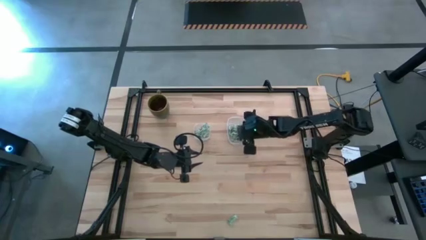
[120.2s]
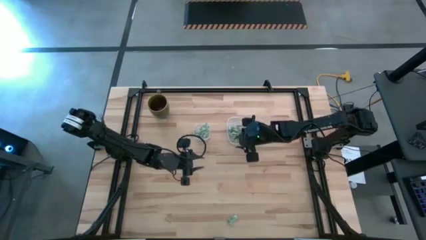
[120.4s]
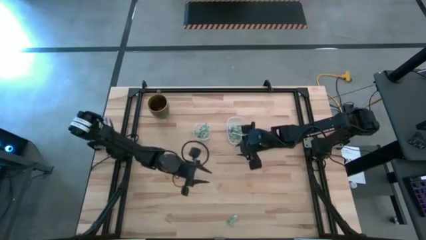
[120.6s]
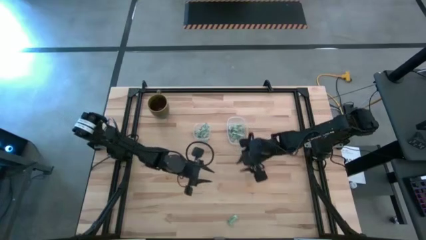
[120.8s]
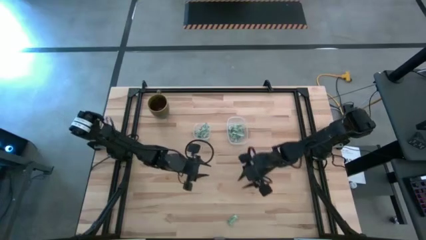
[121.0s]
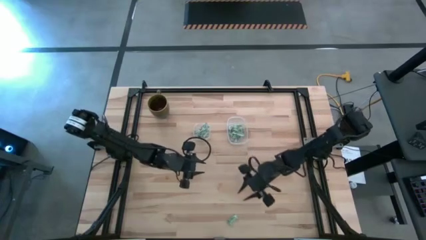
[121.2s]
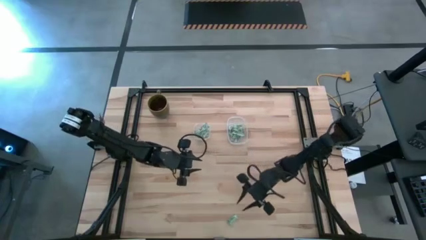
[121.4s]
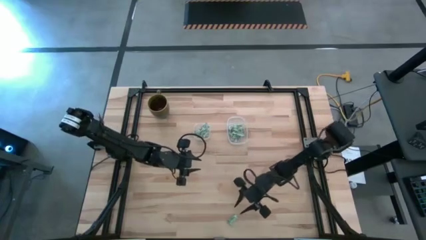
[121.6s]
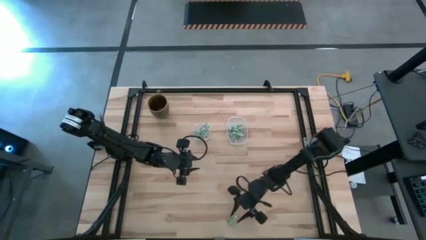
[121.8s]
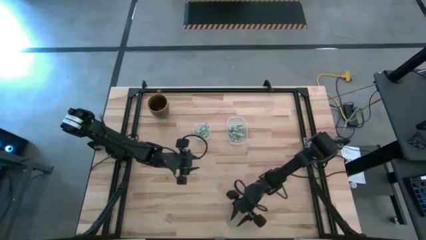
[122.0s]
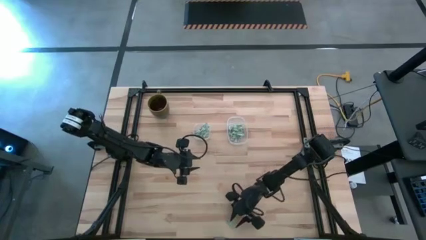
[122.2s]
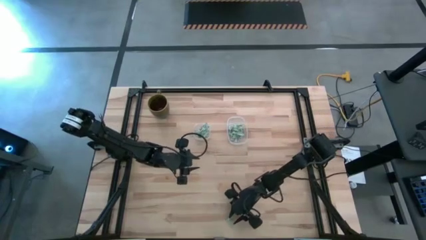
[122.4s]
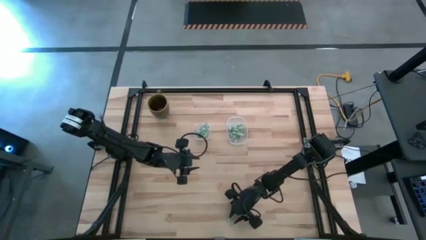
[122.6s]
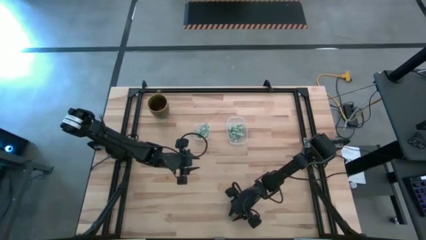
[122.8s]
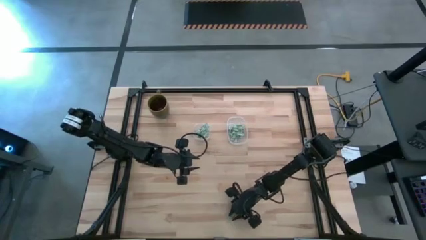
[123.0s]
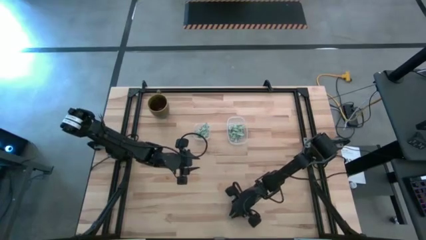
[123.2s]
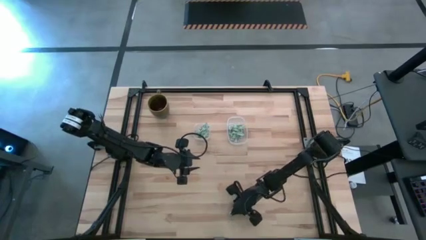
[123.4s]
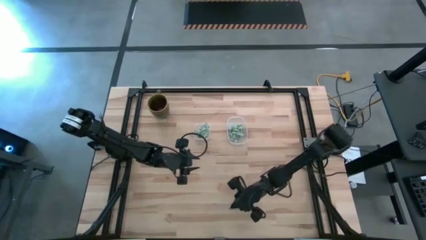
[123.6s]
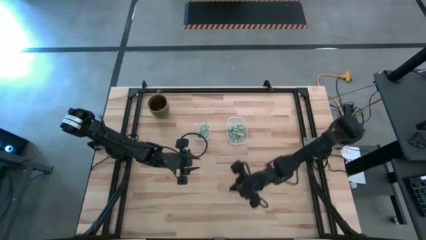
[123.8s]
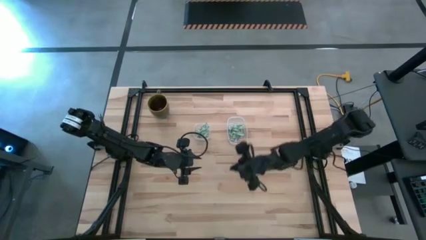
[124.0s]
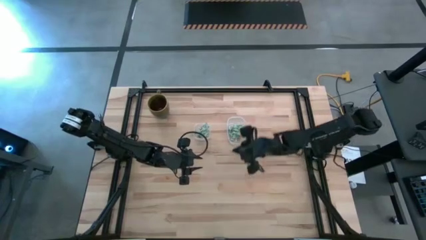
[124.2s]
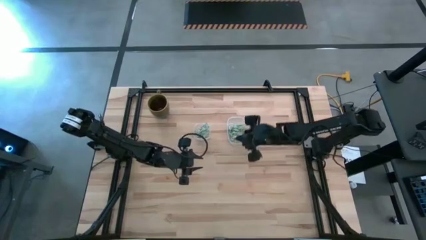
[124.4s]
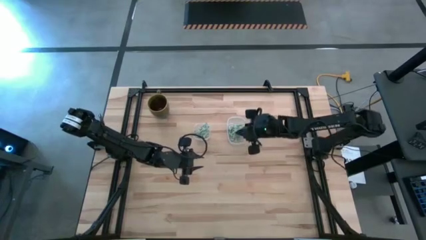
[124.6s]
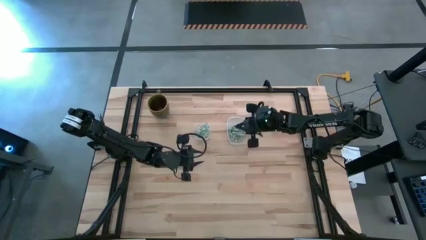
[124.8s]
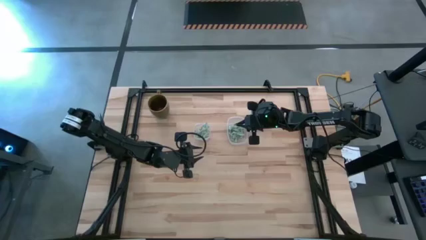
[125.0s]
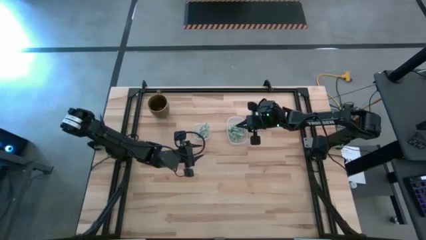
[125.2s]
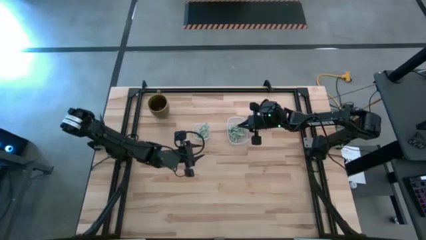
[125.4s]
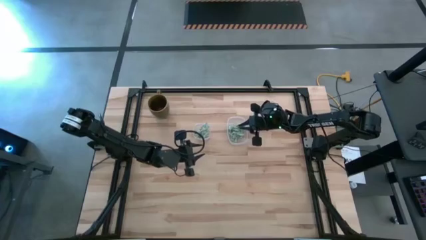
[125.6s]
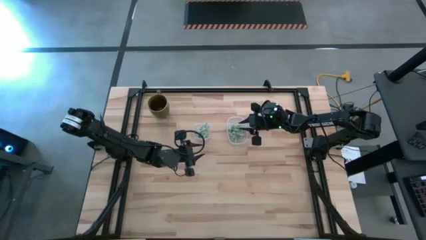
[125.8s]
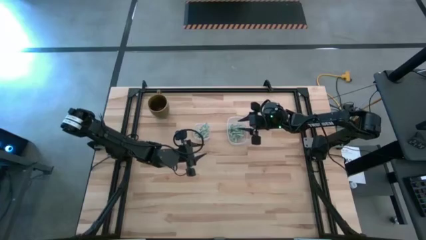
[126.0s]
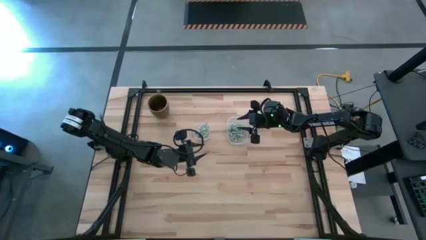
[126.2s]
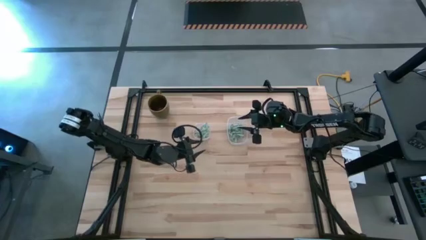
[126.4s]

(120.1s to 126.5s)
Task: Pick and place items into bin
Put the light green stevia packet into the right transparent bin

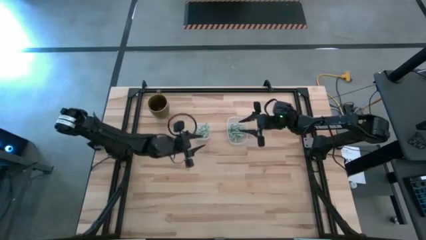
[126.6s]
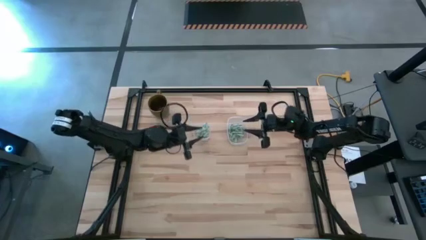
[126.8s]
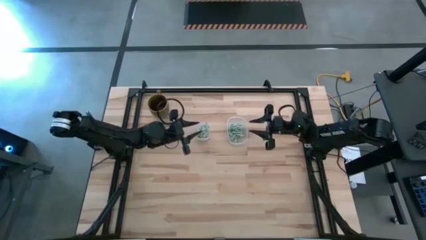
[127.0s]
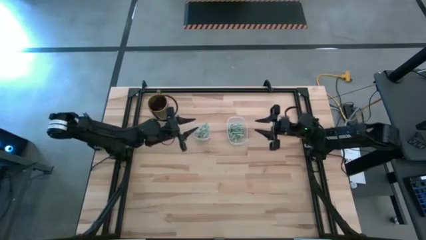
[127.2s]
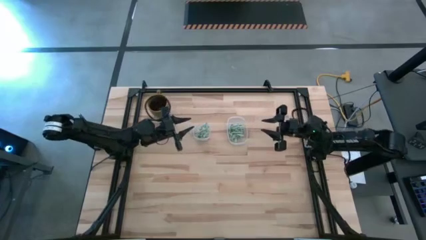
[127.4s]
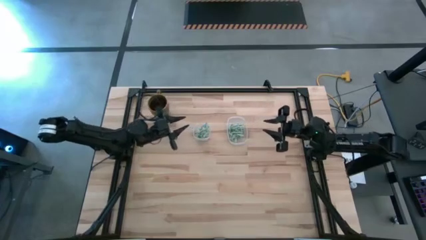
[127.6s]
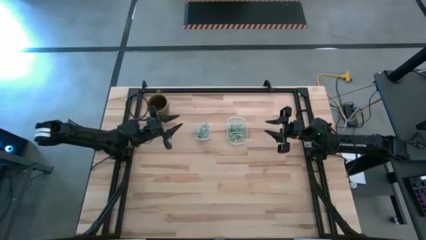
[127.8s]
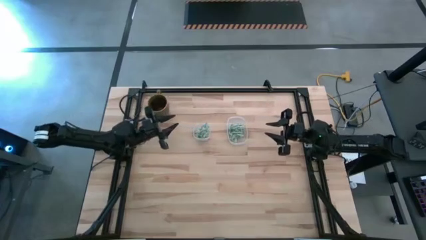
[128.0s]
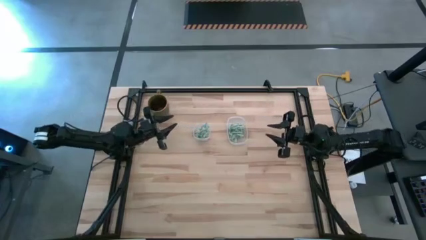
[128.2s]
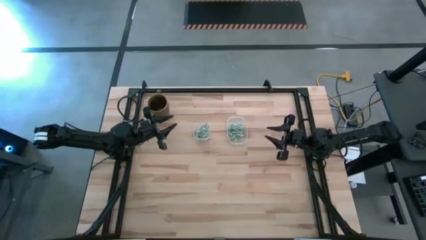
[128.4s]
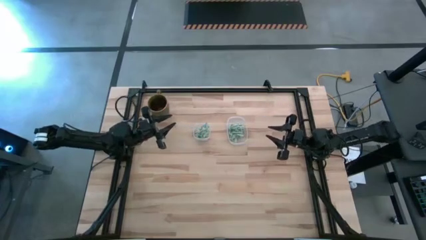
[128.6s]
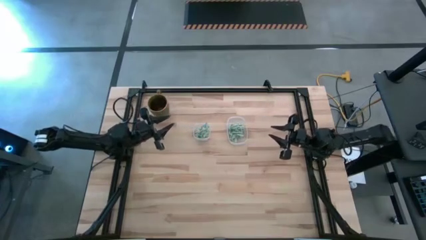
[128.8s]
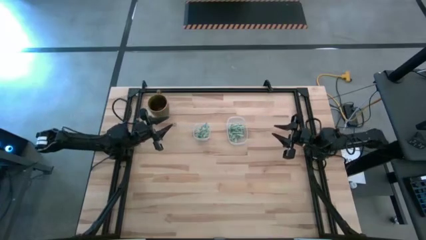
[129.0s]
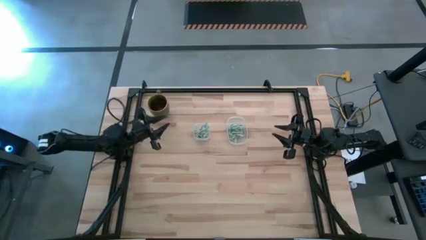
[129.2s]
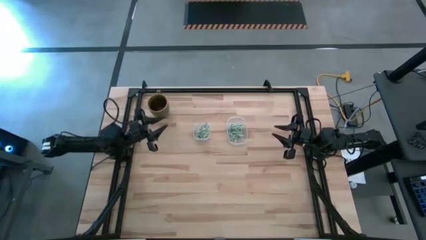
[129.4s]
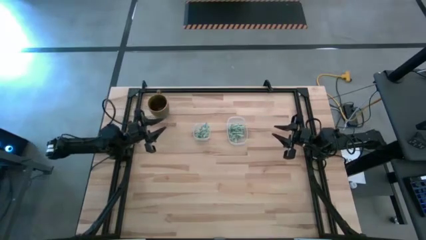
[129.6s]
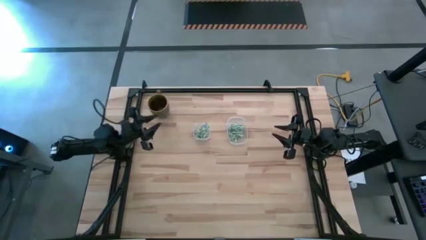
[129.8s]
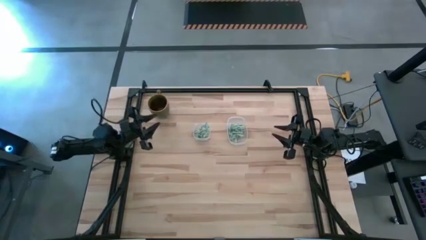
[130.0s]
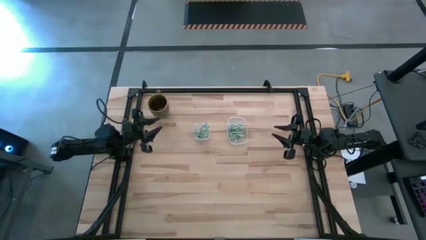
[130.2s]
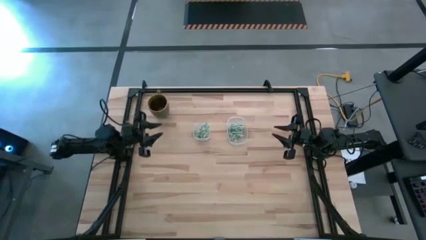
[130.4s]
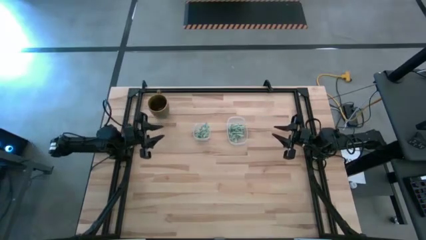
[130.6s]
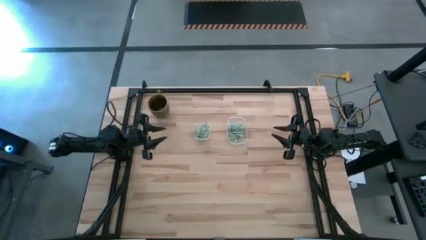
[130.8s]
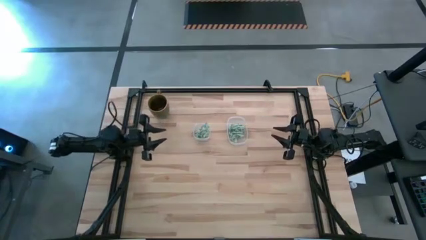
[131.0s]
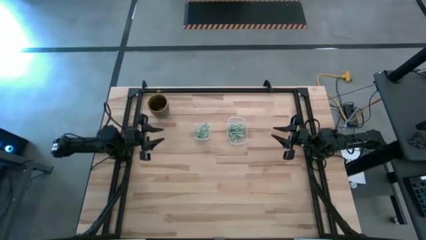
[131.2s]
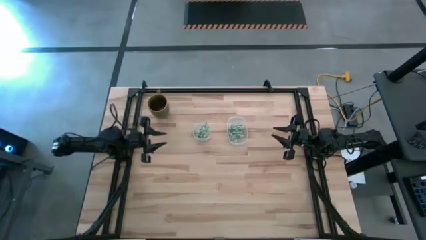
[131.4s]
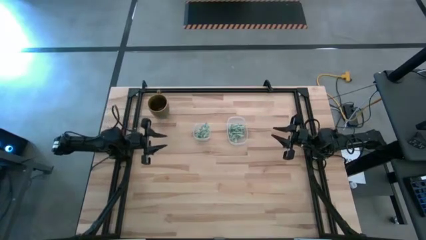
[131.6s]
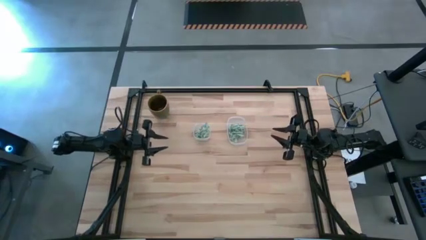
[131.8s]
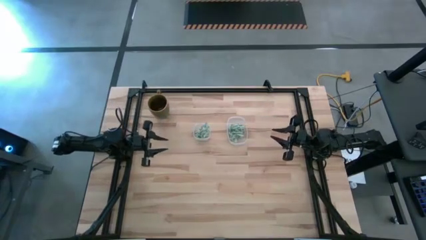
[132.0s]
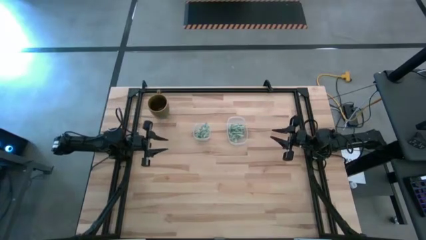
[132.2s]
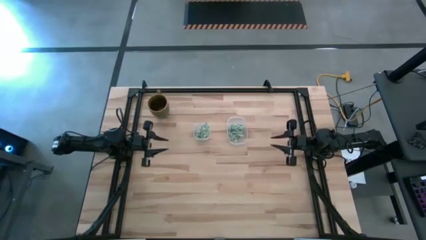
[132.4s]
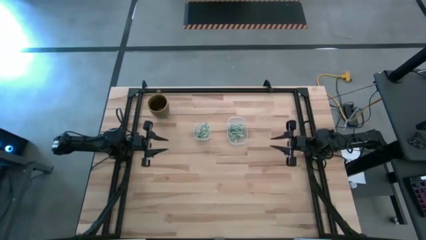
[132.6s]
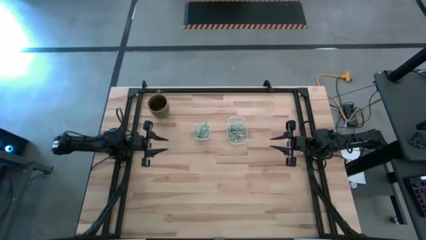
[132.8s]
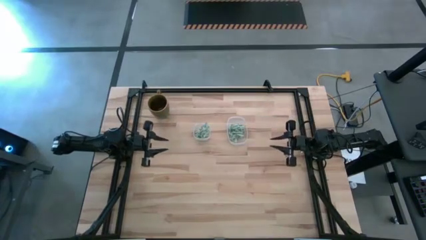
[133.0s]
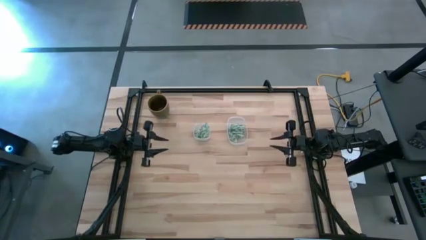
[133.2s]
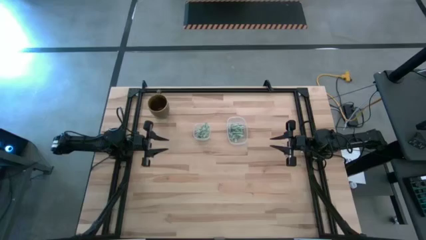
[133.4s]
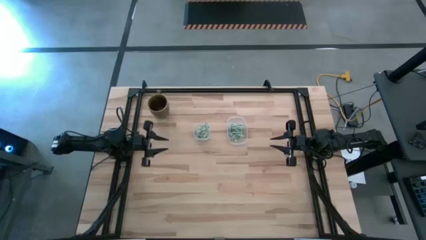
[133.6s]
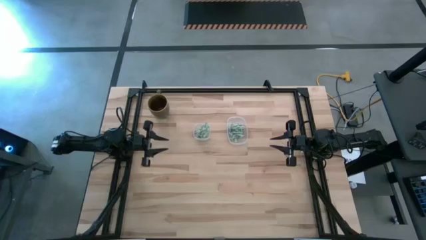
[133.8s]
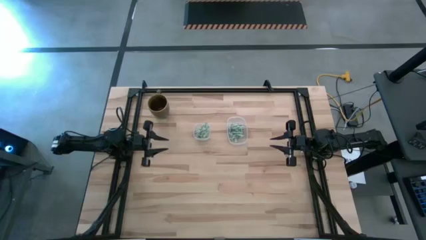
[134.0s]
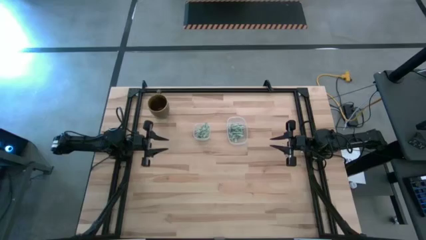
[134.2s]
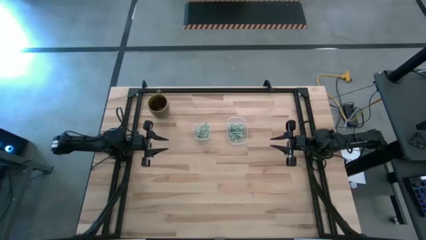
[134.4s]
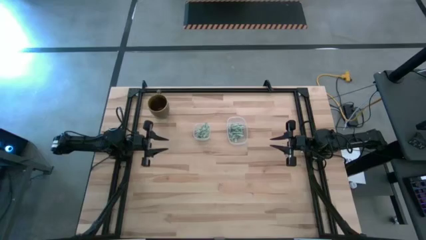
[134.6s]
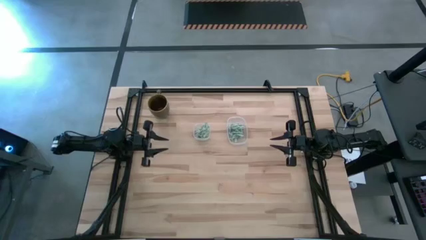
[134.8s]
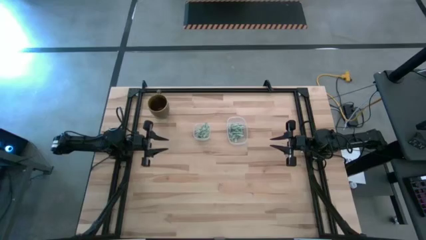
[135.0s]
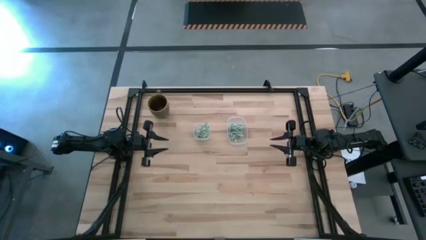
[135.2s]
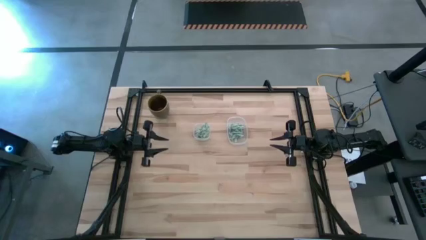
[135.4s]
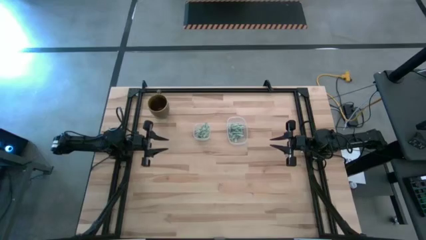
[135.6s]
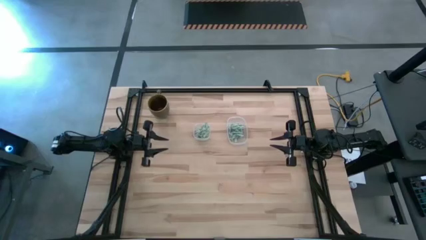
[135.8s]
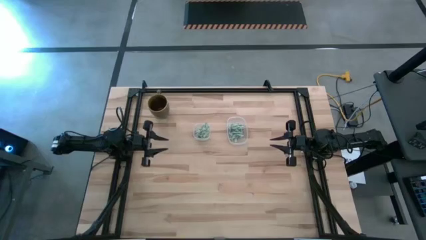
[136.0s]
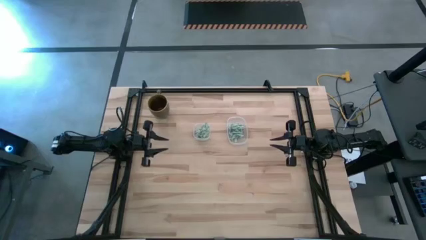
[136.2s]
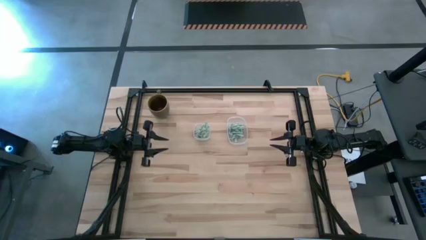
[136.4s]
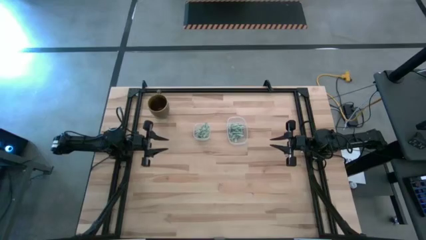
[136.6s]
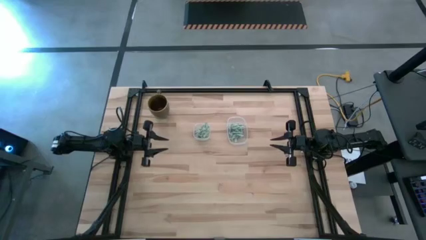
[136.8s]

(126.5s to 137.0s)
Return to Home Position
